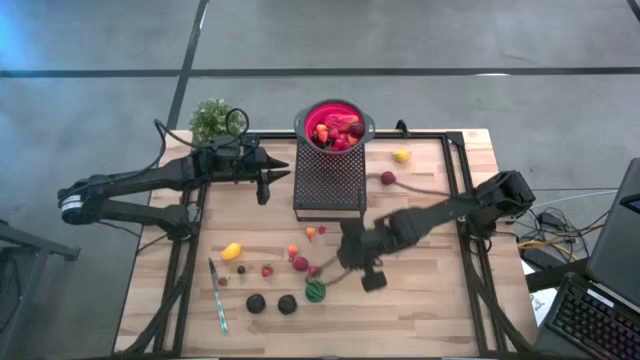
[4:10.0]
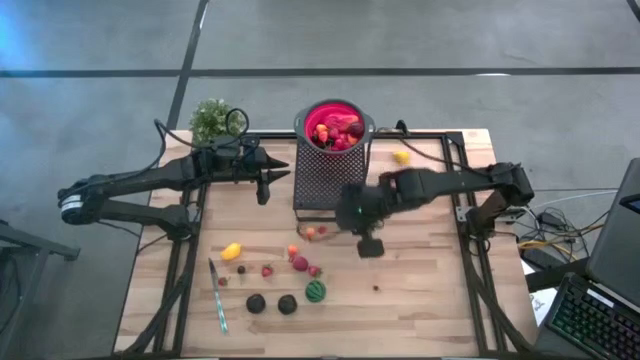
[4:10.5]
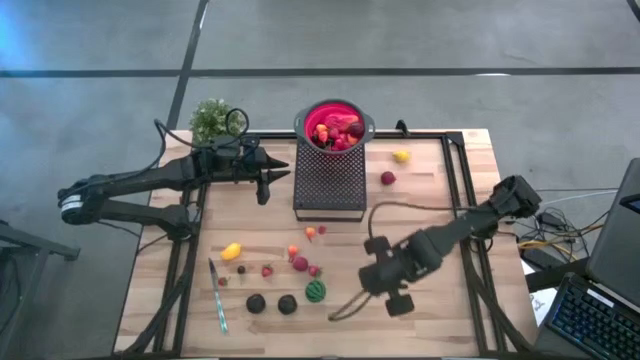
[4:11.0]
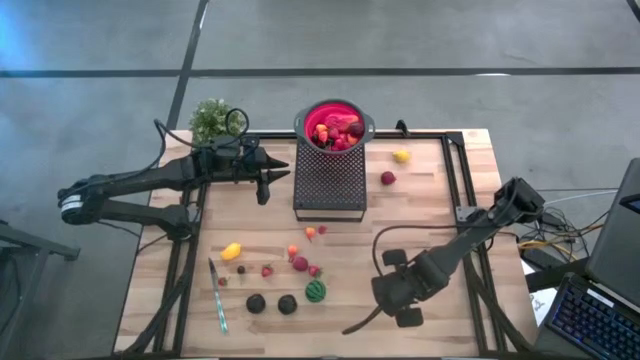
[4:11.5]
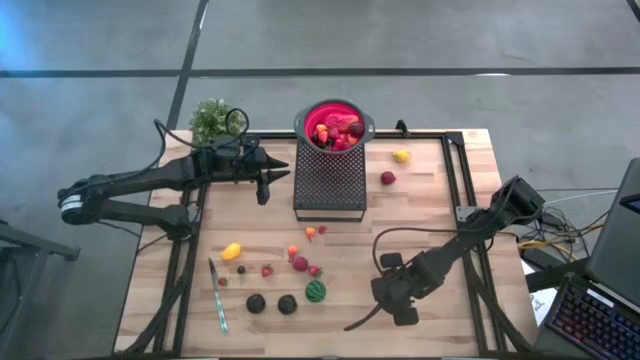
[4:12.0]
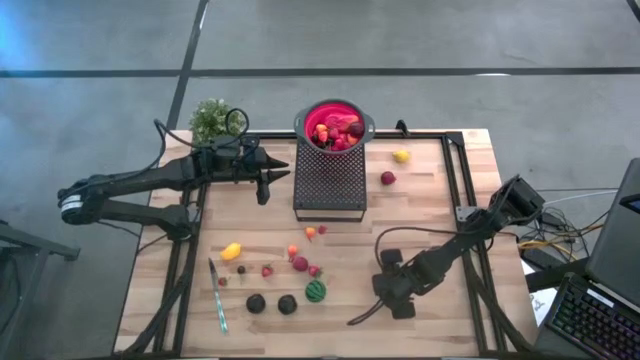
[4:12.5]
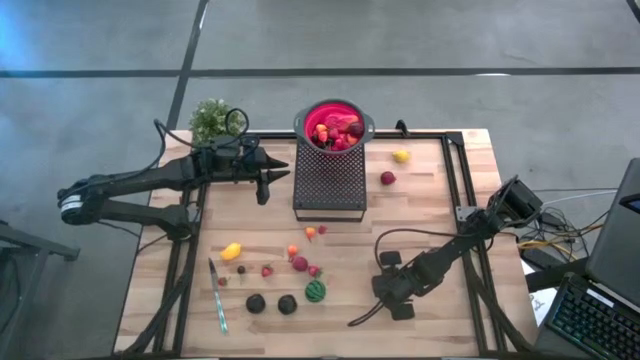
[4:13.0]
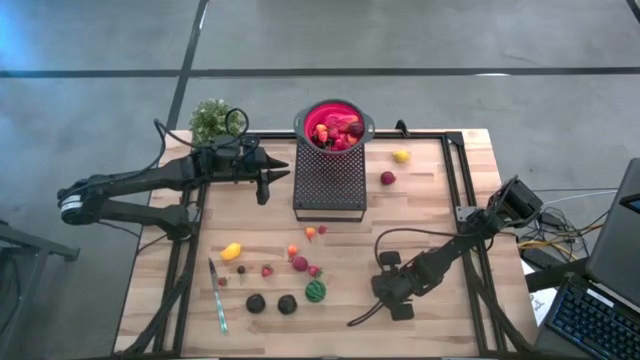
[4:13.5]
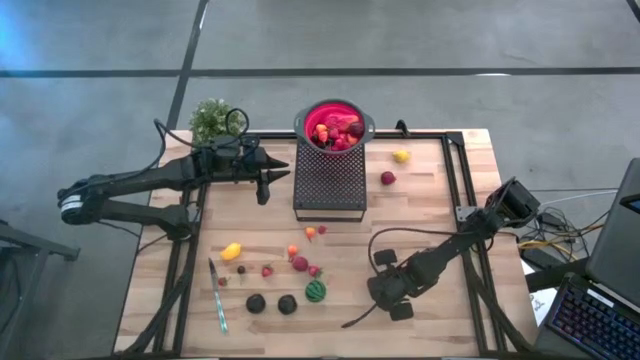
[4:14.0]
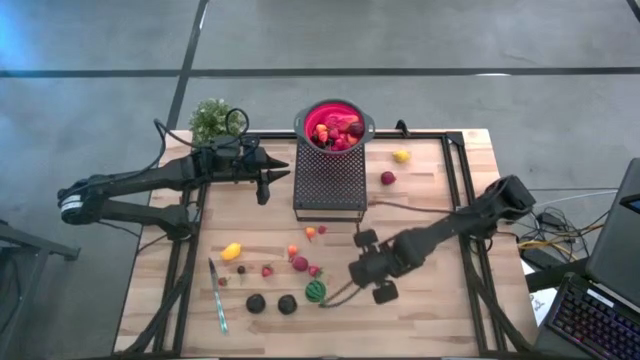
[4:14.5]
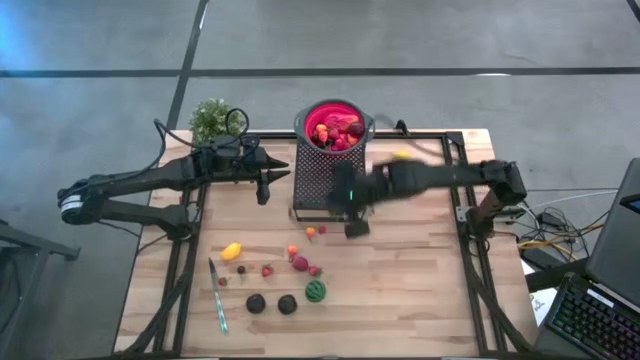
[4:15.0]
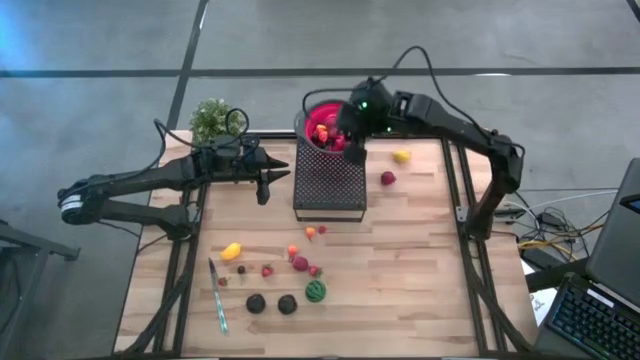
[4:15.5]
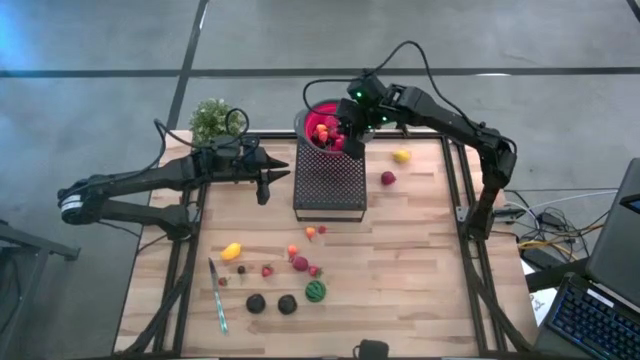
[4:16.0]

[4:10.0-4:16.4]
Task: Pick & Place Fruit
Put the blueberry into the red strainer bowl on the shelf

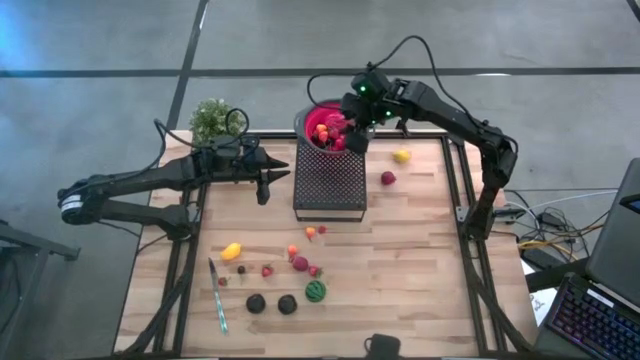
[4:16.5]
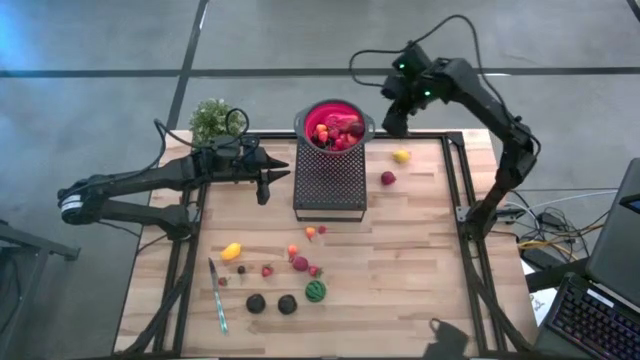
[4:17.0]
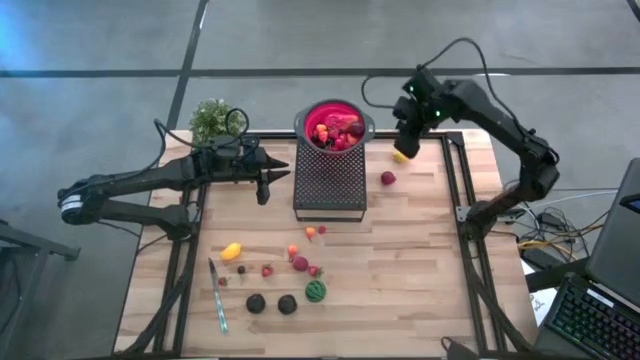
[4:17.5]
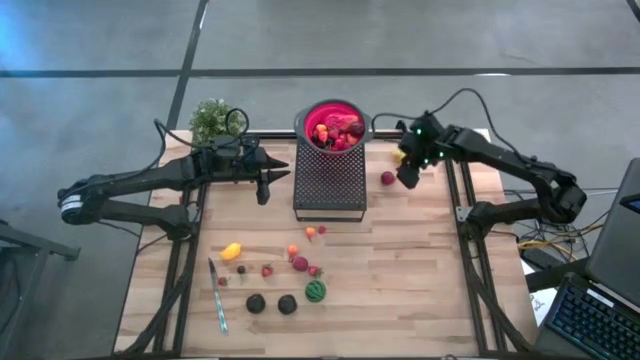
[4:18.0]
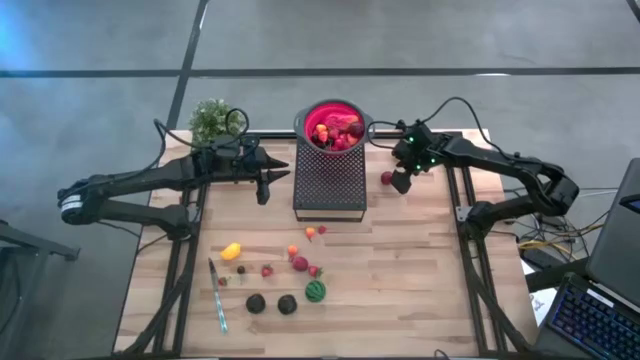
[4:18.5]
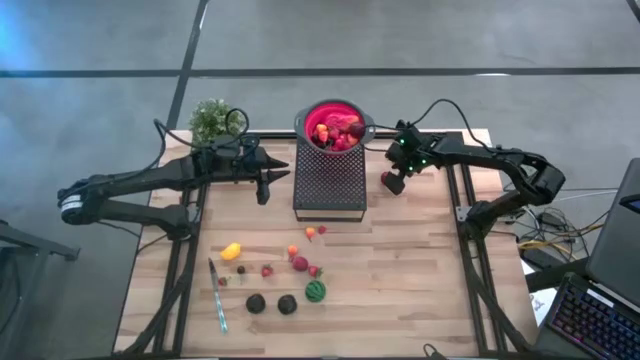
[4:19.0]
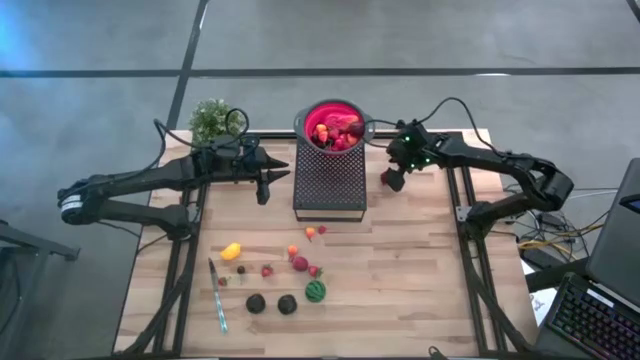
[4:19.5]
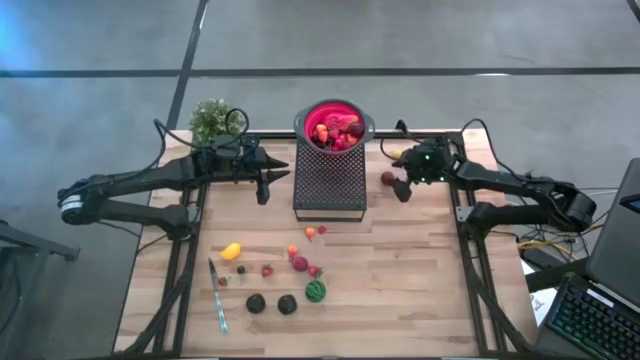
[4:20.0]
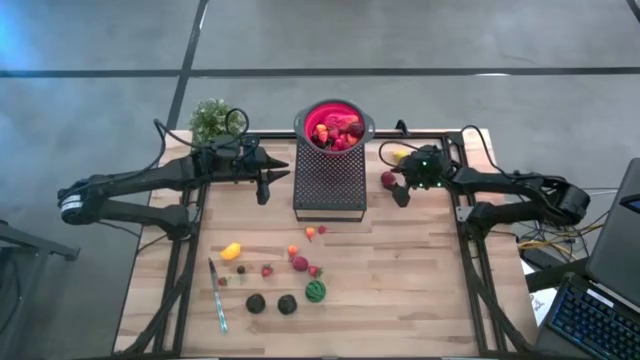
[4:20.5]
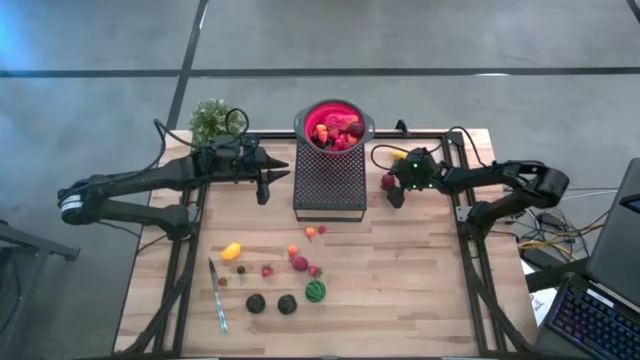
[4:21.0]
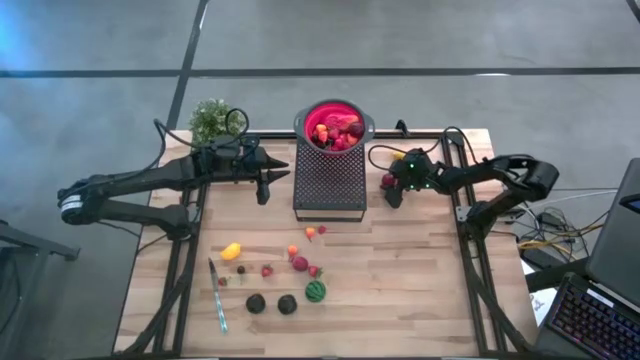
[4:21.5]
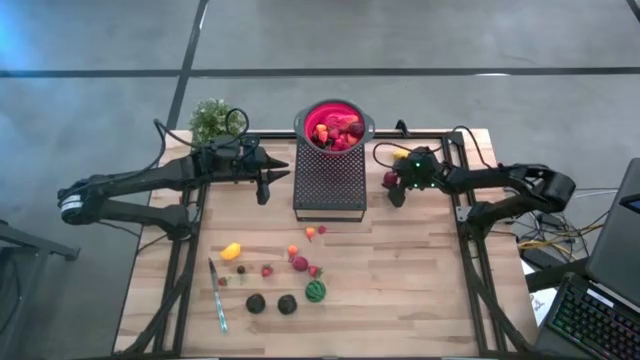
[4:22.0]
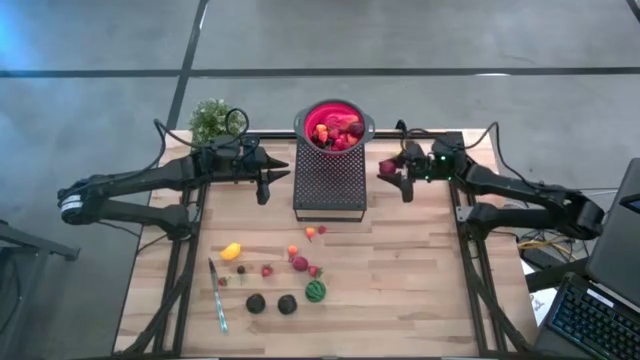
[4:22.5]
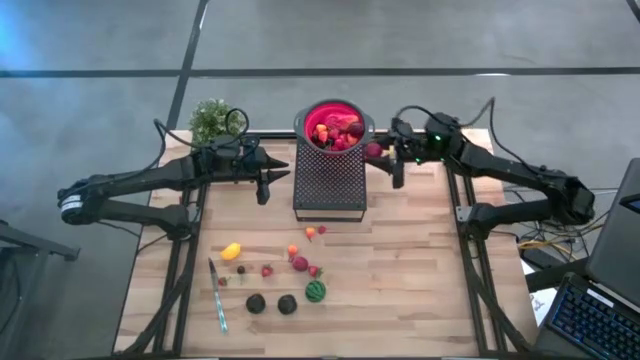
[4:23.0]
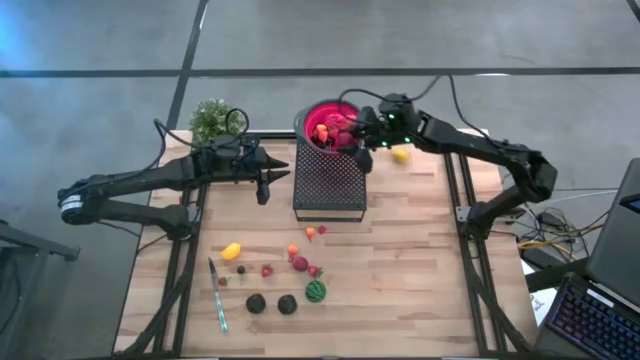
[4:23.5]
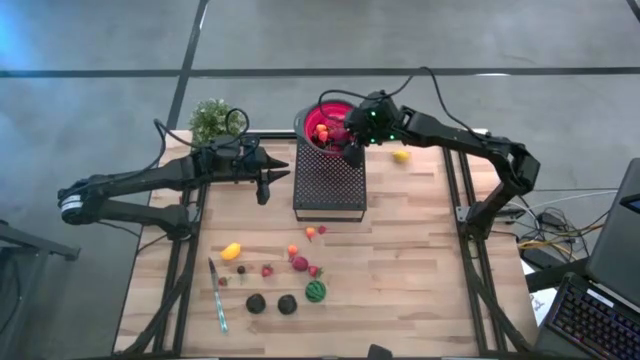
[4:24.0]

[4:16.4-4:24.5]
Put the pomegranate into the red strainer bowl on the shelf

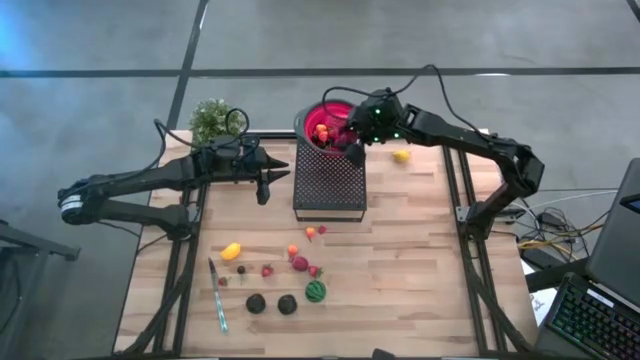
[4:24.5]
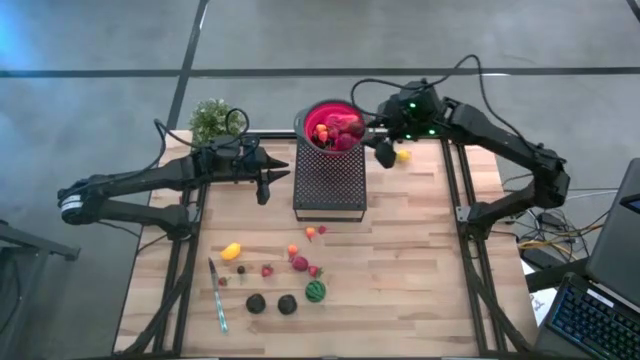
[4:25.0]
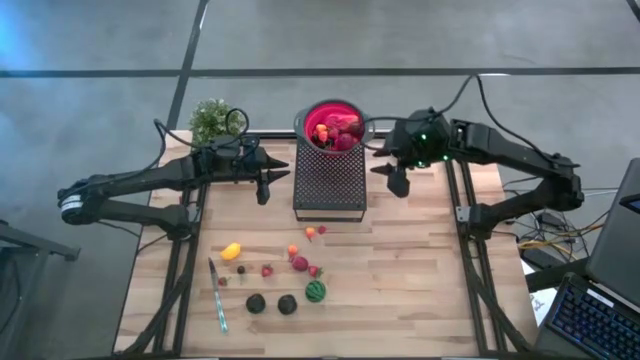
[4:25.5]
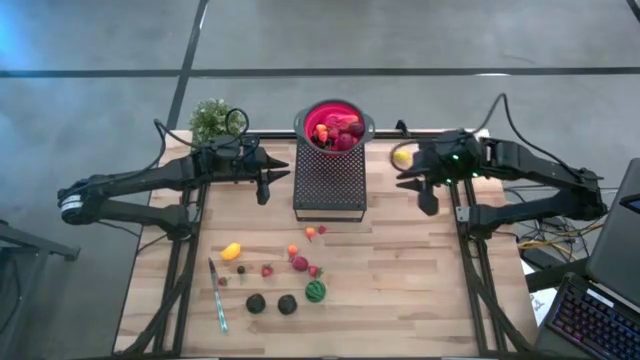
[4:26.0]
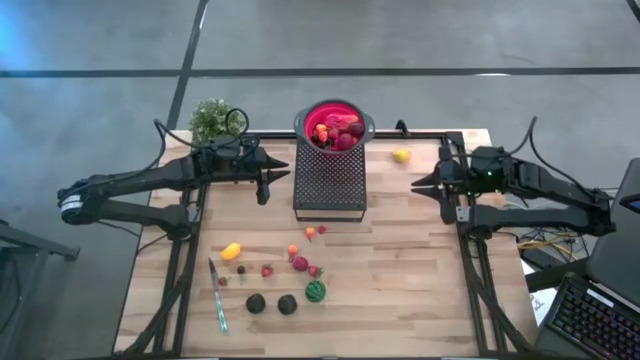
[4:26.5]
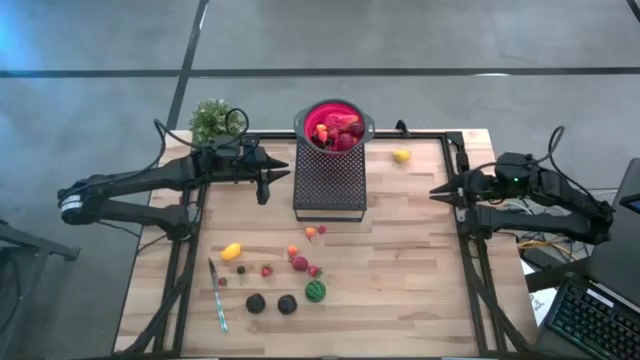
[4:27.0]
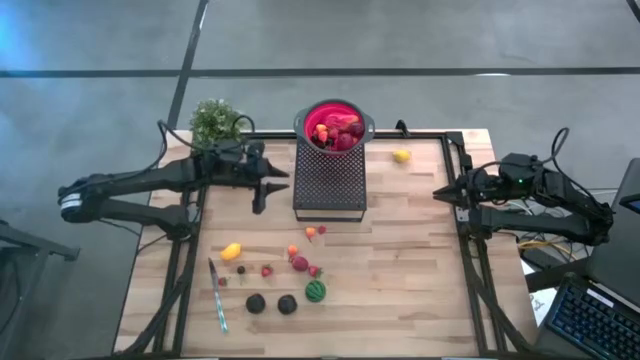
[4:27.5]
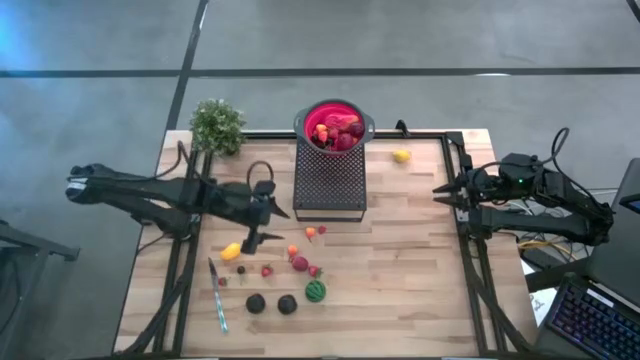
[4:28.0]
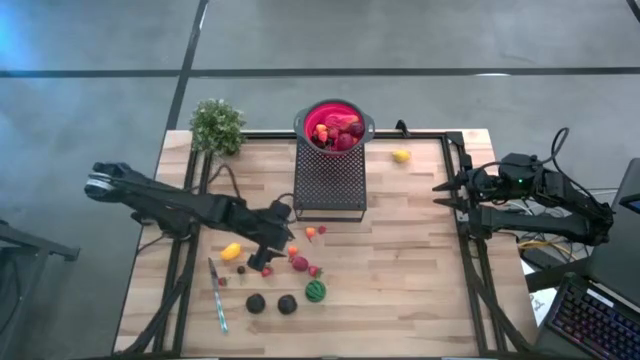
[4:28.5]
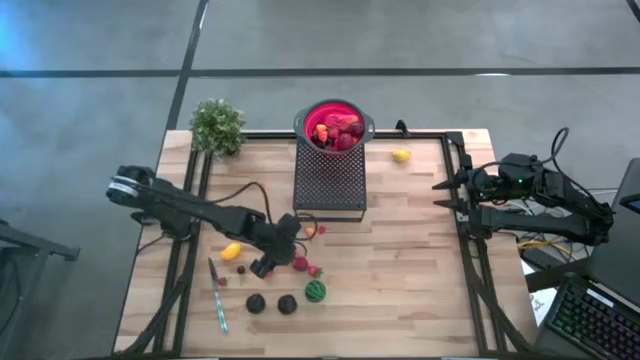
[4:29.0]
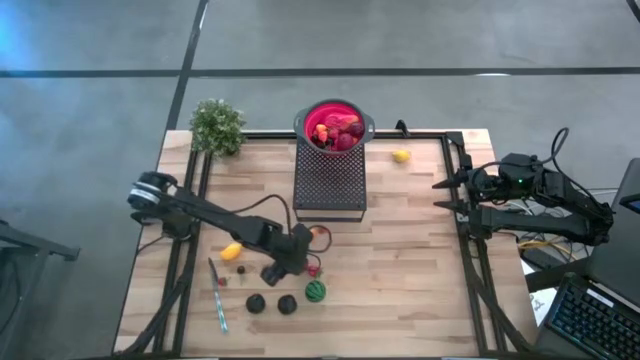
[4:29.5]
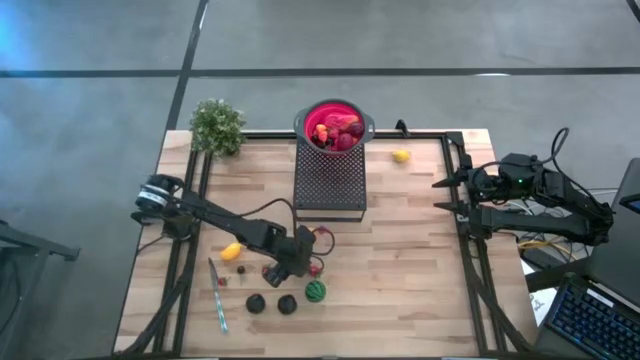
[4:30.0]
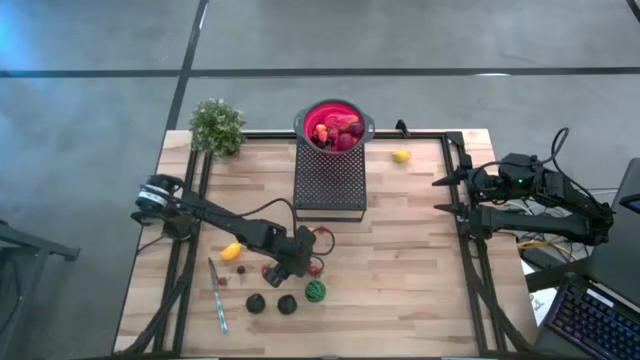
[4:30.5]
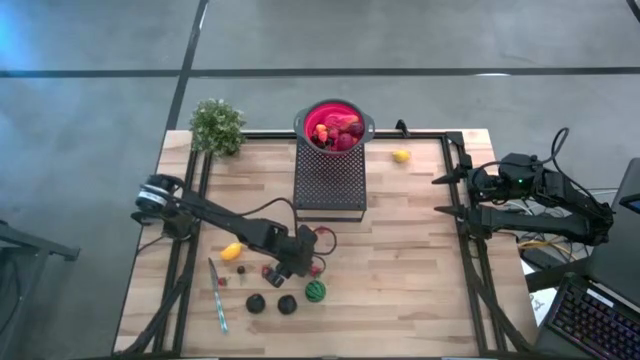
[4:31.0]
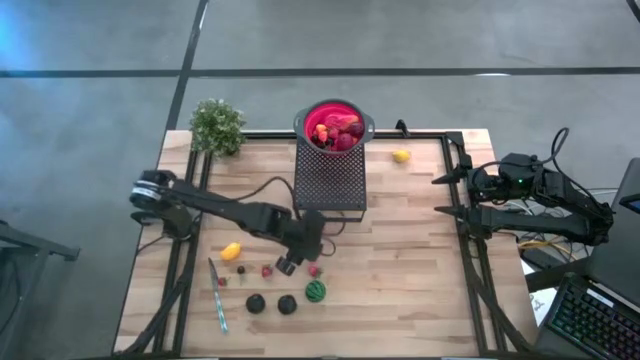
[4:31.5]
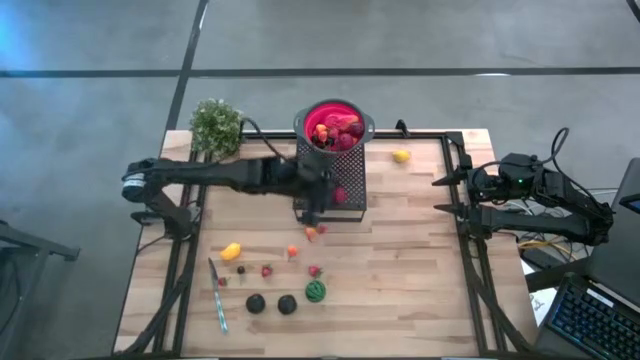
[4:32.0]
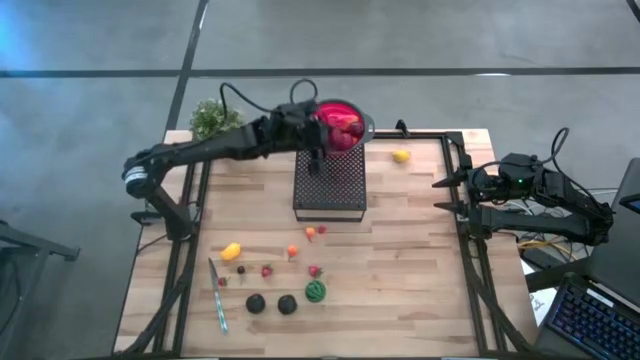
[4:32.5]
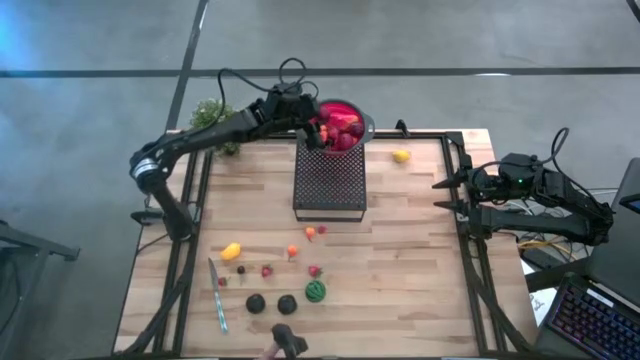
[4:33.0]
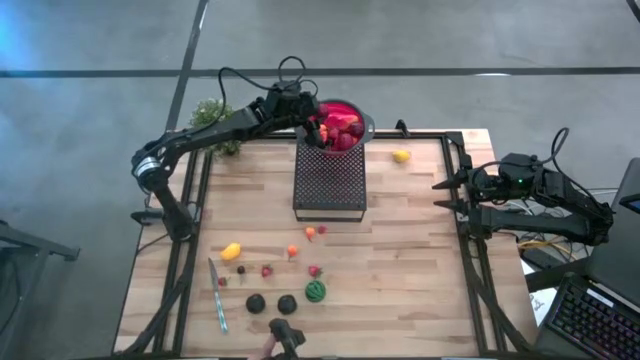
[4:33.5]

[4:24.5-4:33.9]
Put the pomegranate into the red strainer bowl on the shelf
